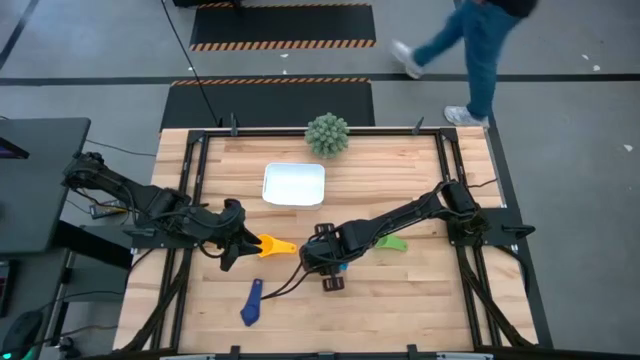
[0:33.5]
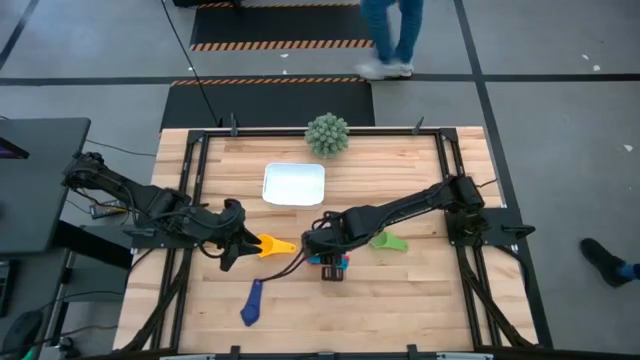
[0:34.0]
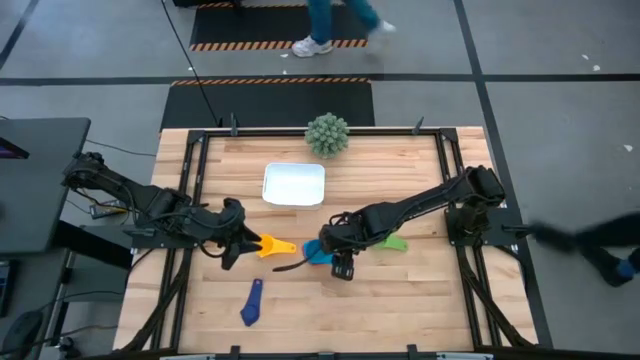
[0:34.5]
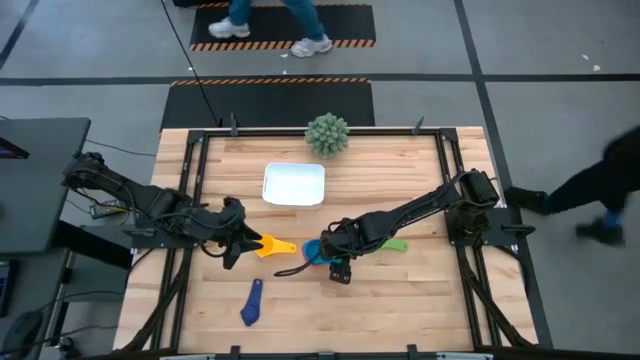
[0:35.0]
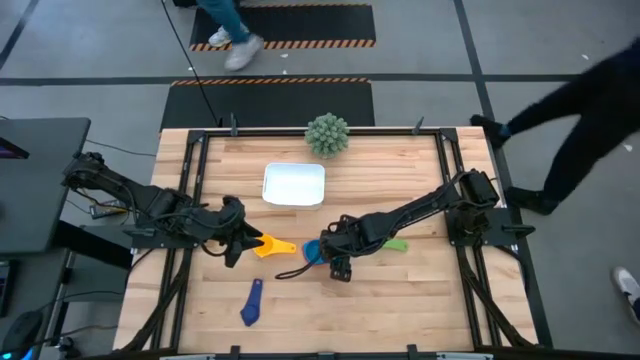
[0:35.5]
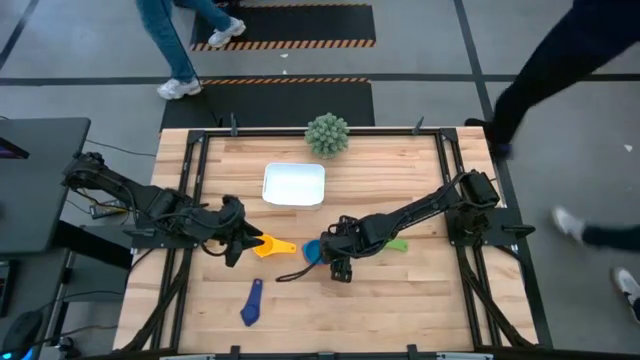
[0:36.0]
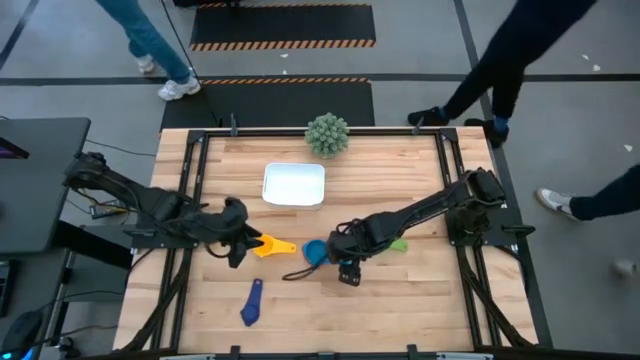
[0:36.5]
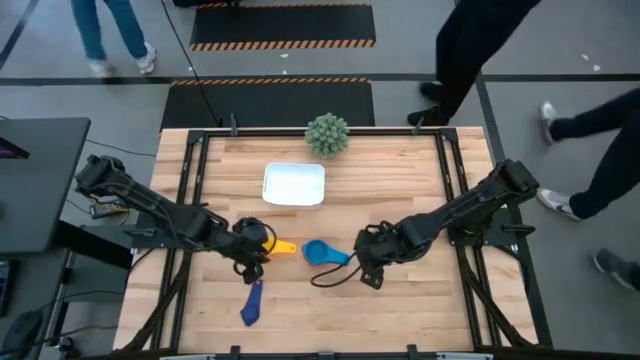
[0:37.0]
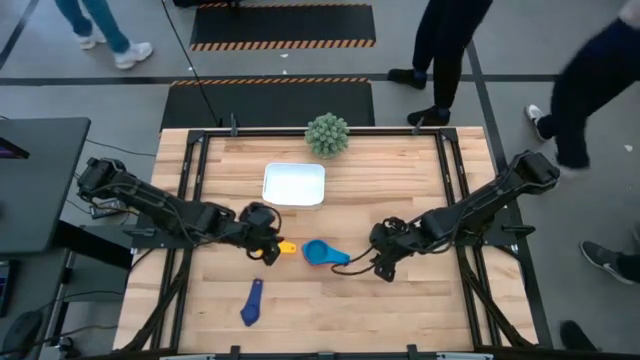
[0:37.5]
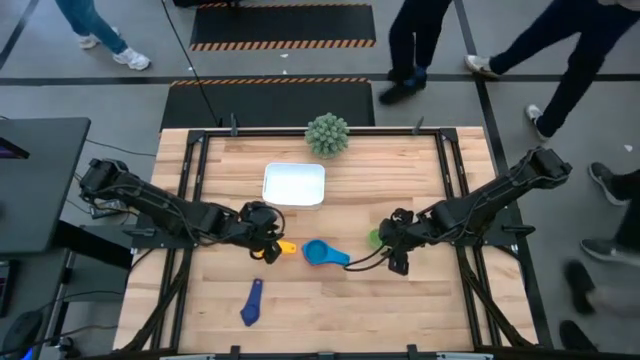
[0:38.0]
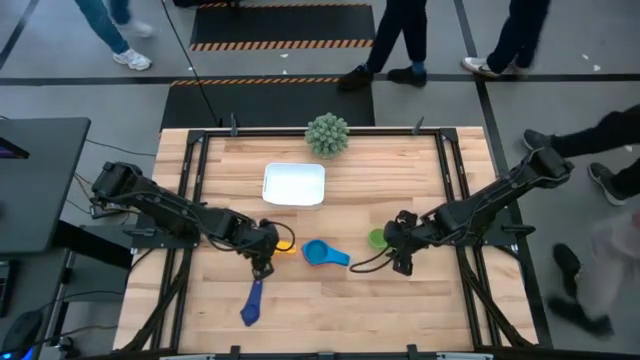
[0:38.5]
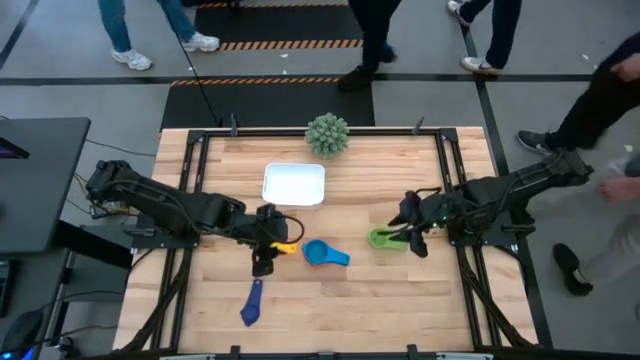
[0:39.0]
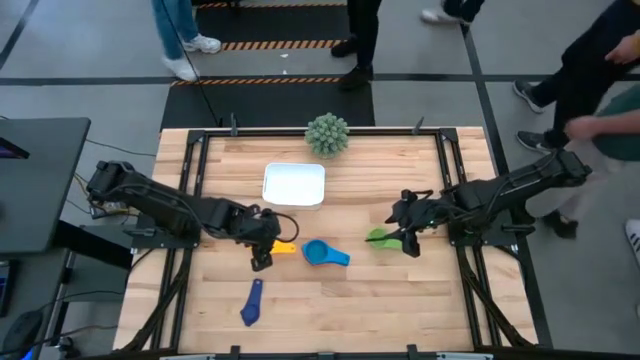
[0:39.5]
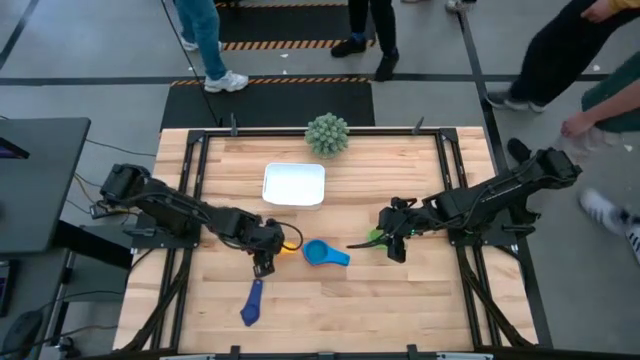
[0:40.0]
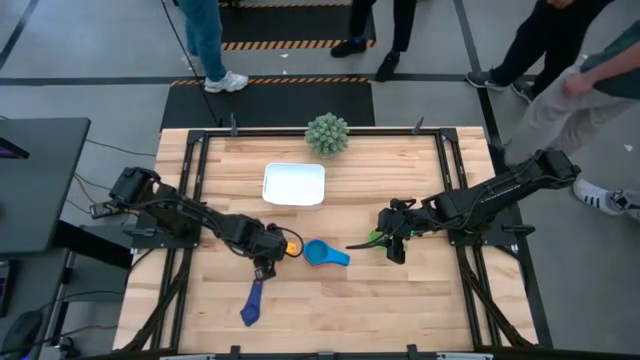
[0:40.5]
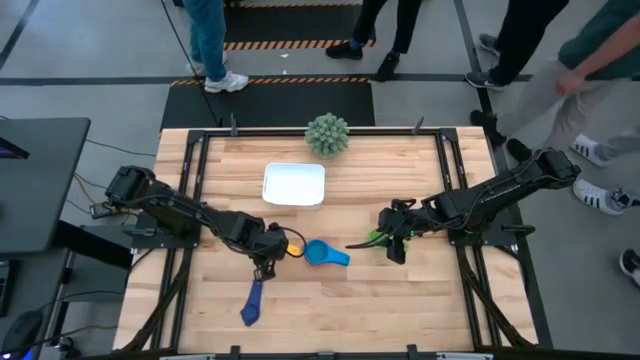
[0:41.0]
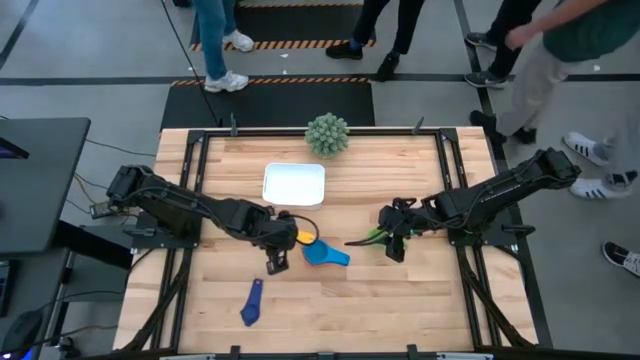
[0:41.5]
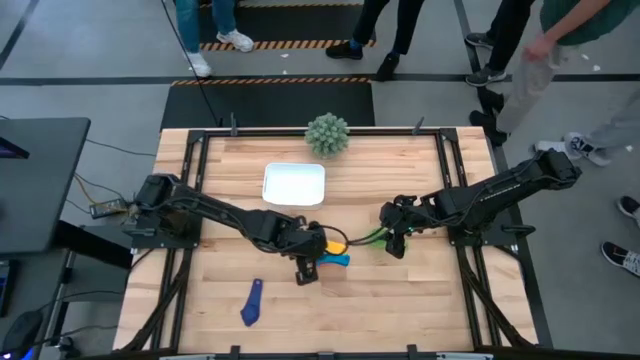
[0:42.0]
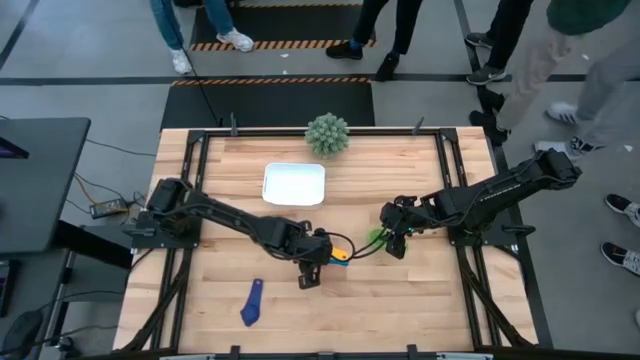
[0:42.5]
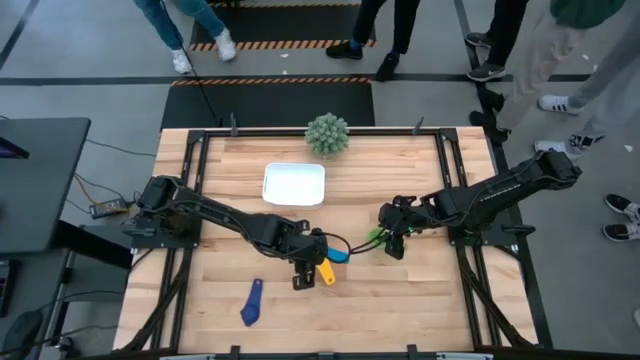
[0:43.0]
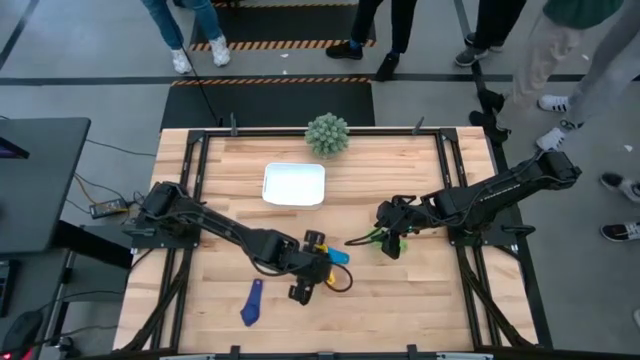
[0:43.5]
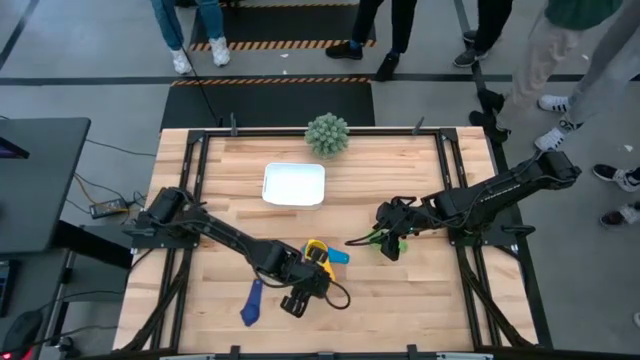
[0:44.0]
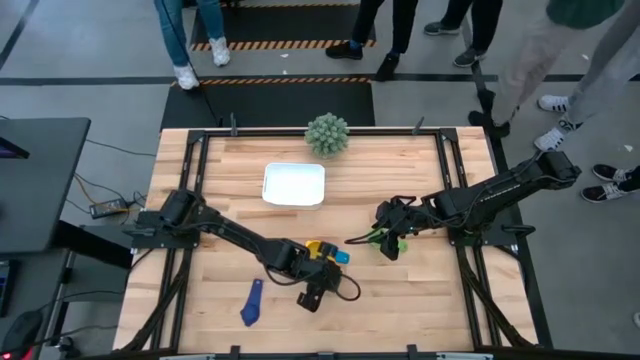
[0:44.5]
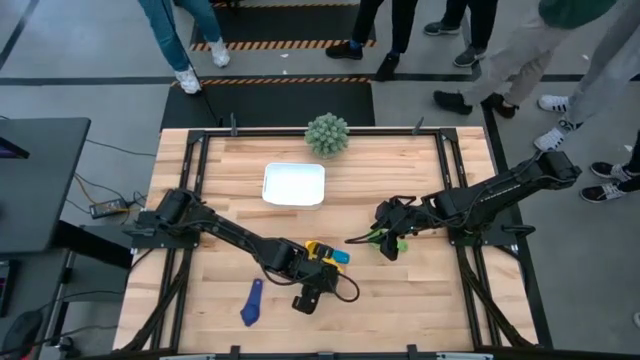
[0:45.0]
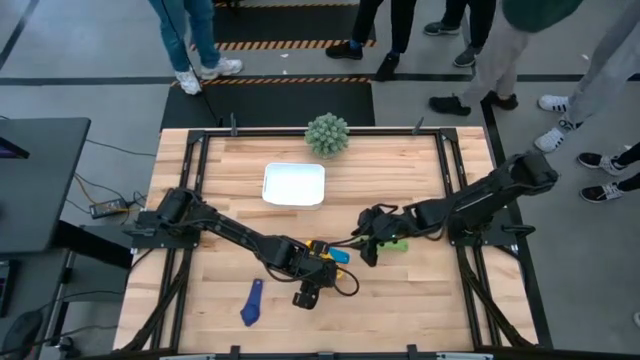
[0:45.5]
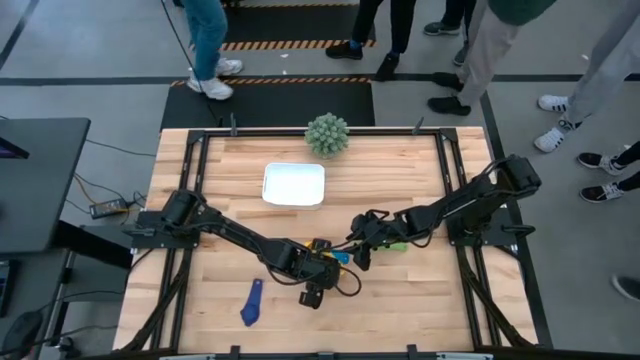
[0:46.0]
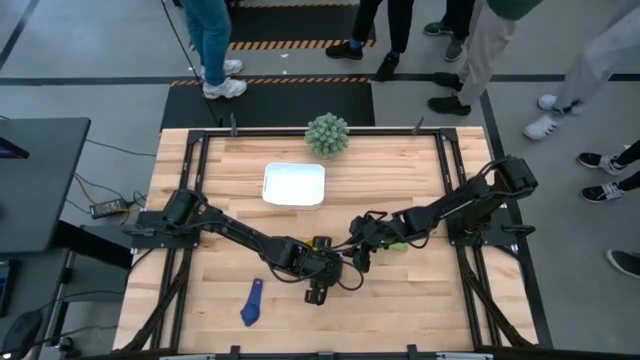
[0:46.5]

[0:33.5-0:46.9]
Task: Nest measuring cups in basket
Stack the yellow measuring cup on top of the light blue measuring cup

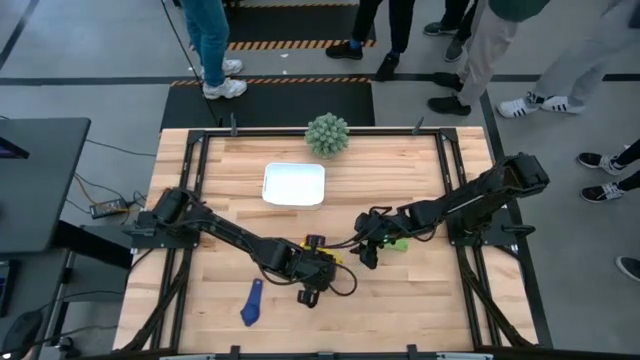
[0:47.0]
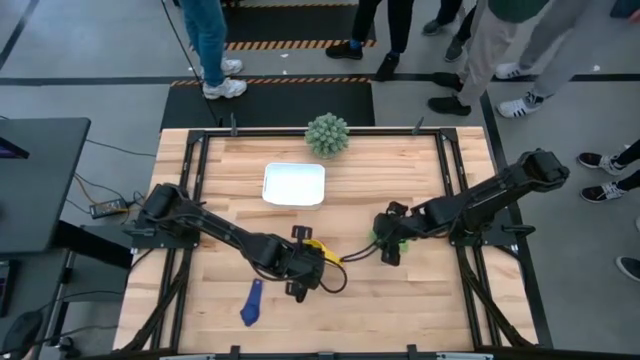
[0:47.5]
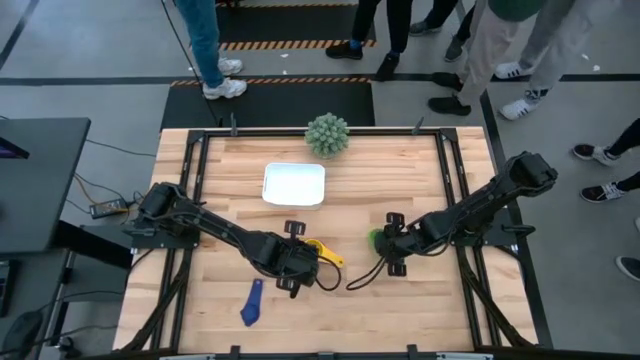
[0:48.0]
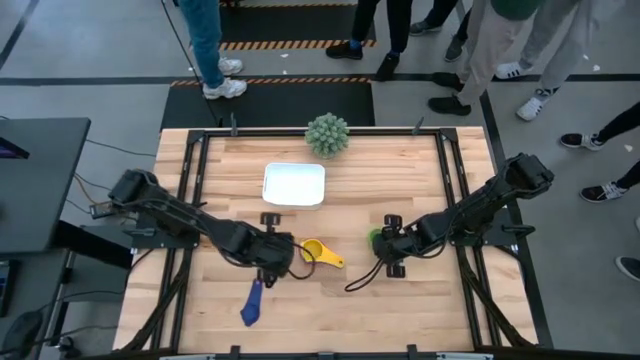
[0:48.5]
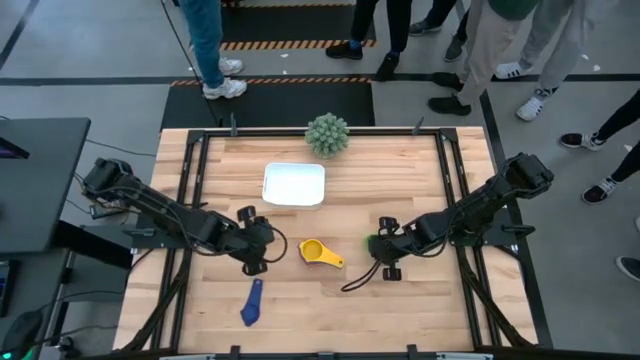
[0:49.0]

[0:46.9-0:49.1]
Stack the green measuring cup on top of the yellow measuring cup

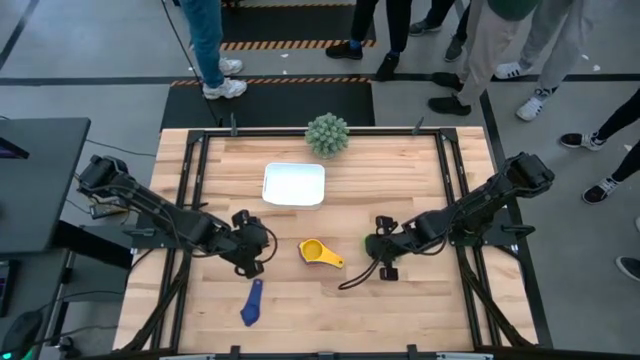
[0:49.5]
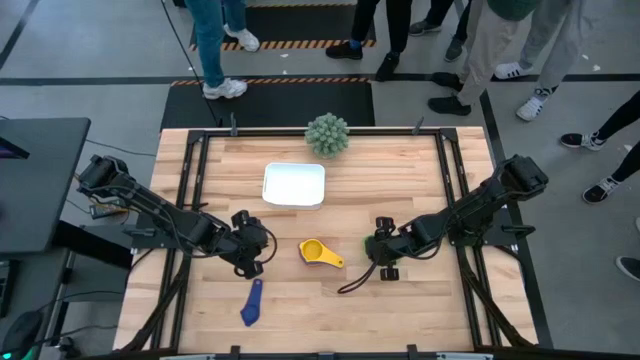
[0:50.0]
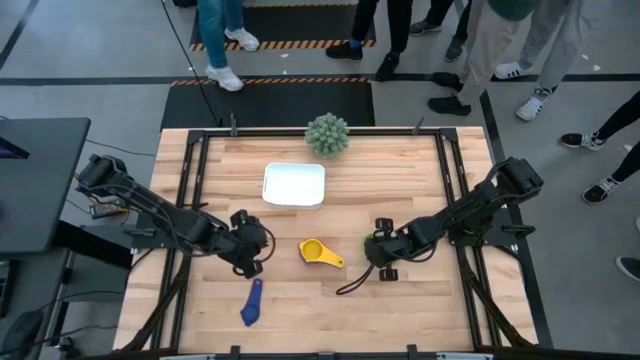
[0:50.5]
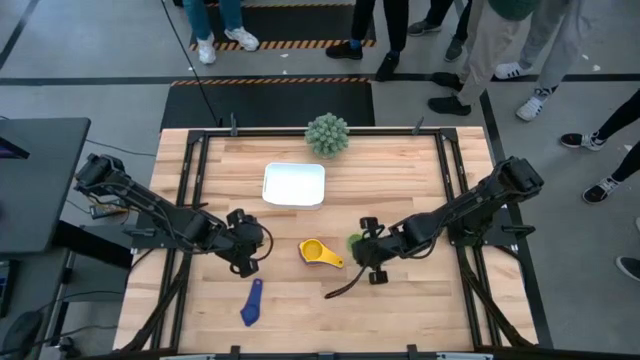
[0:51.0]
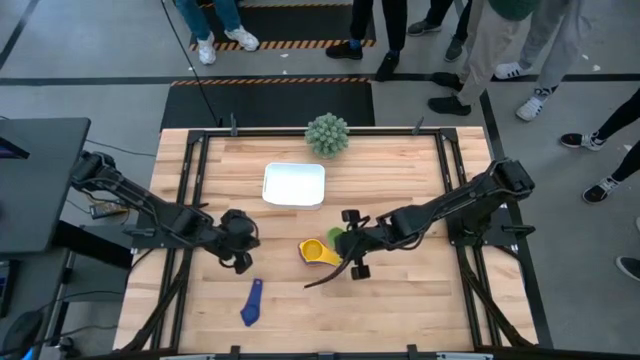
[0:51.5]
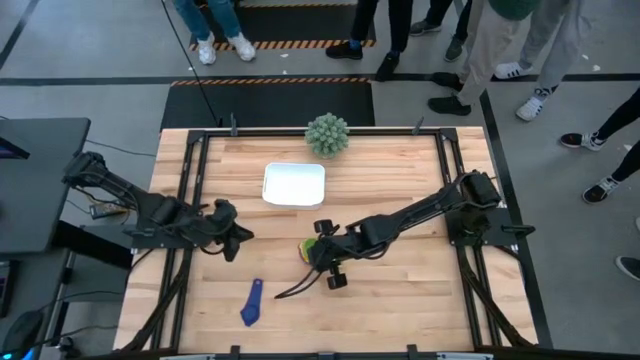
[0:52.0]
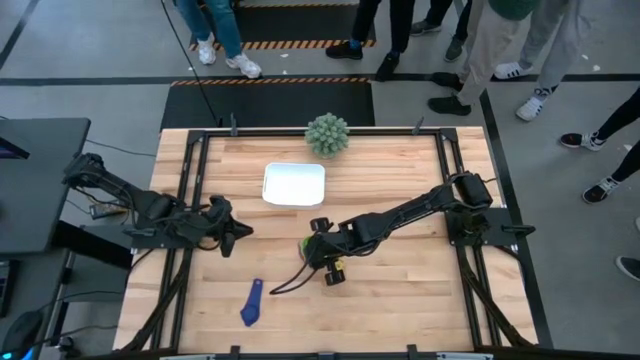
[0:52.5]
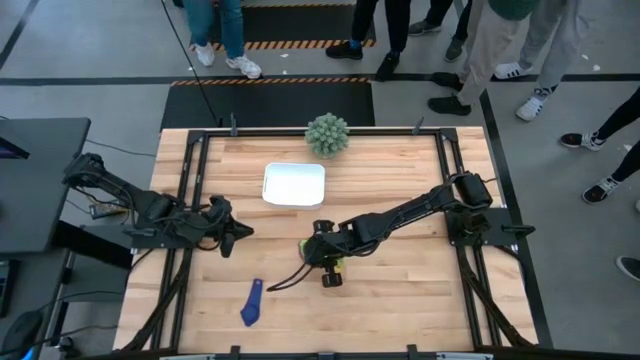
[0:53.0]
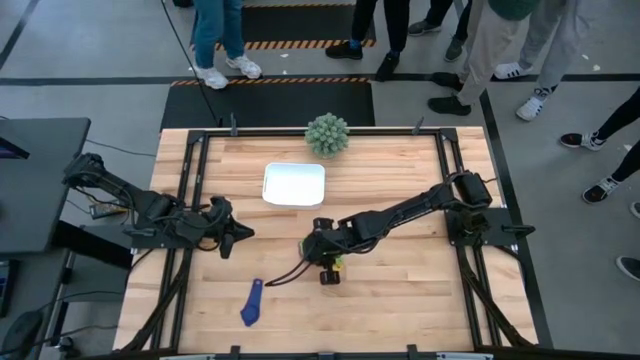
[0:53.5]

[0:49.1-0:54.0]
Stack the green measuring cup on top of the yellow measuring cup

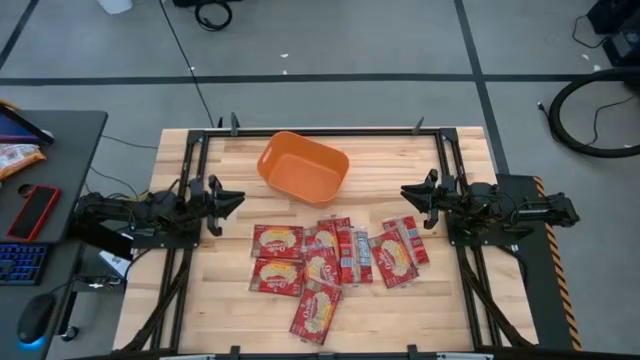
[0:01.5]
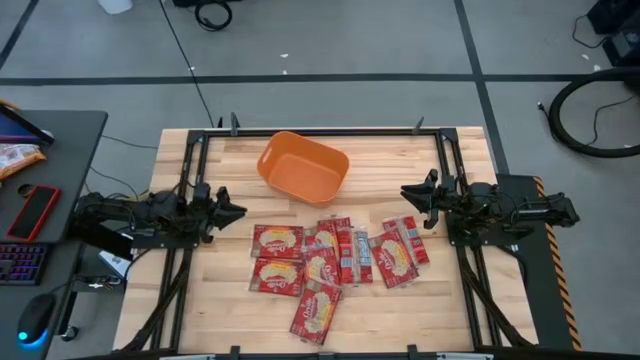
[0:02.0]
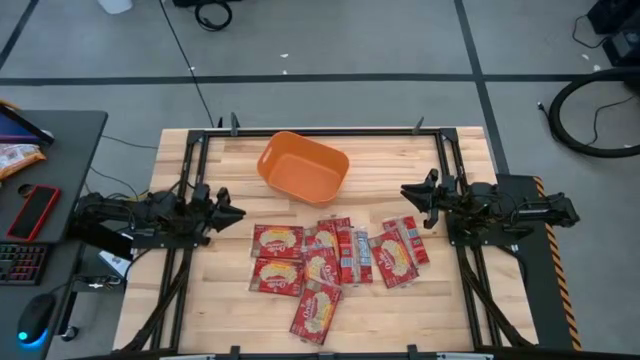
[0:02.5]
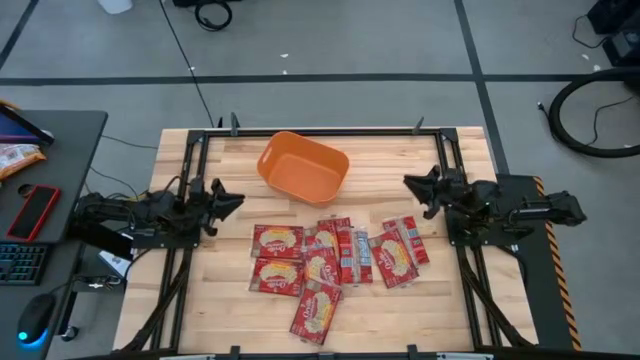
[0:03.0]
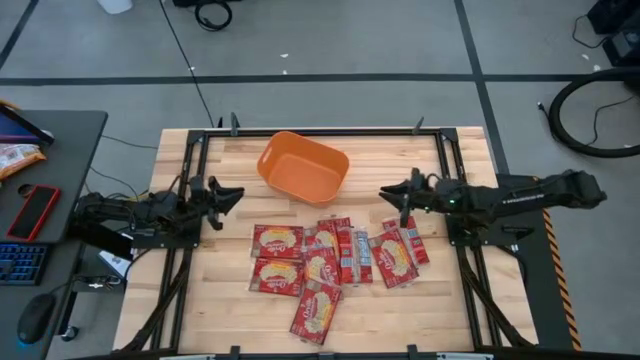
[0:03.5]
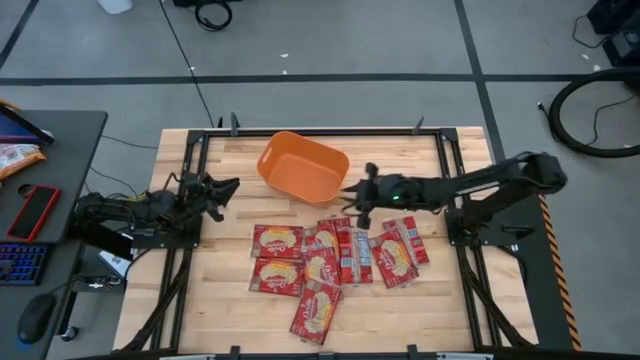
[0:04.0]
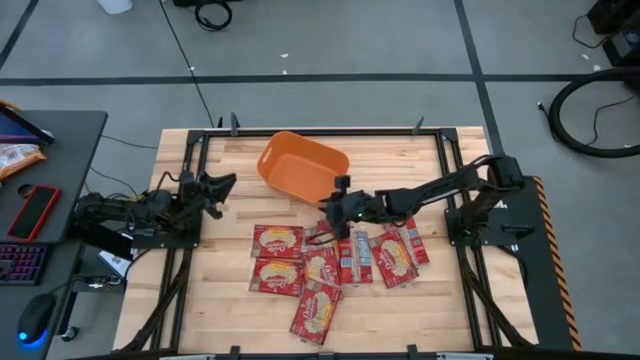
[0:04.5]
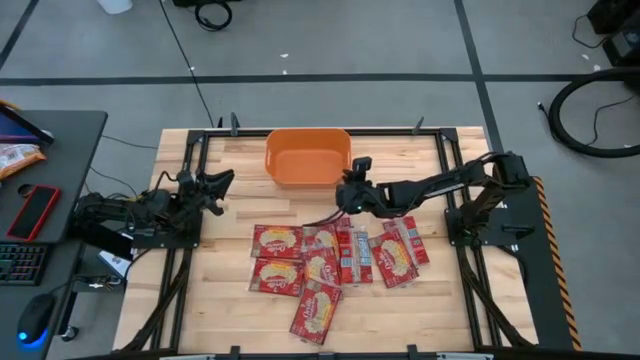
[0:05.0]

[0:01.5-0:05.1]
Task: Sort popcorn bags into baskets
Adjust the orange container
